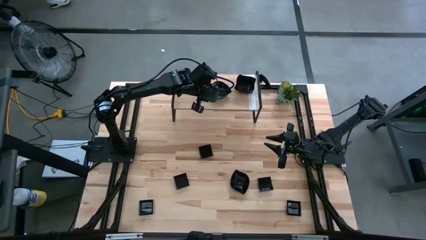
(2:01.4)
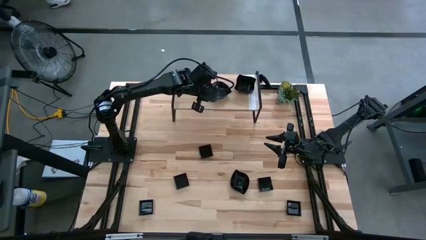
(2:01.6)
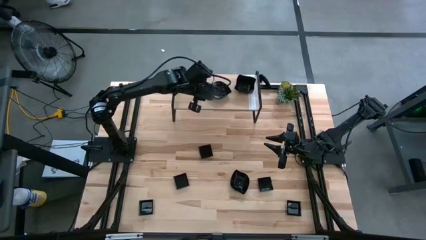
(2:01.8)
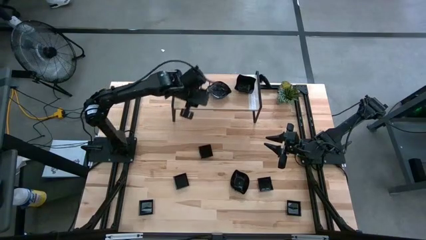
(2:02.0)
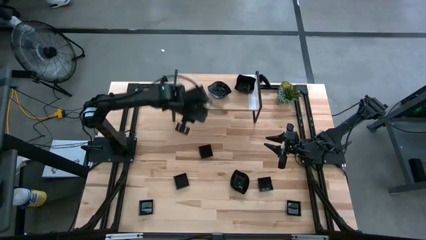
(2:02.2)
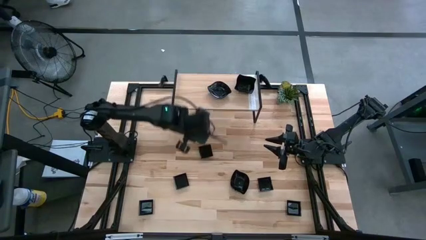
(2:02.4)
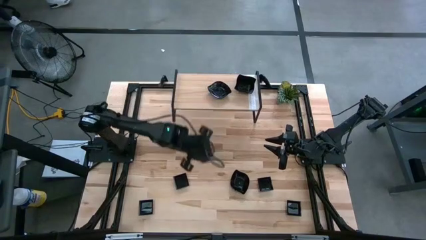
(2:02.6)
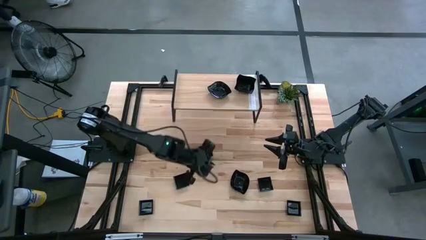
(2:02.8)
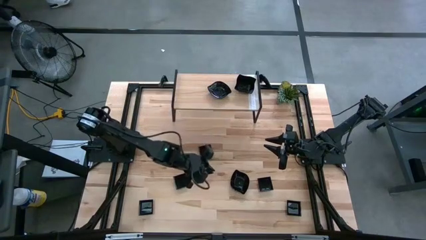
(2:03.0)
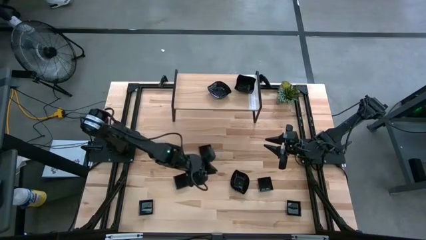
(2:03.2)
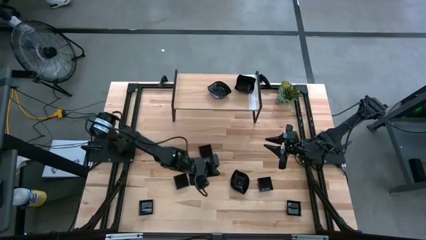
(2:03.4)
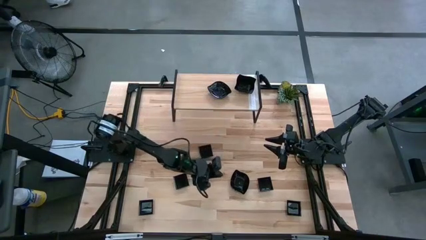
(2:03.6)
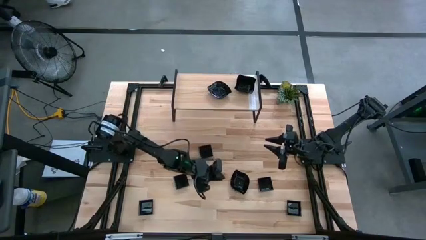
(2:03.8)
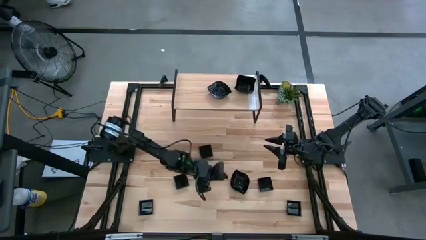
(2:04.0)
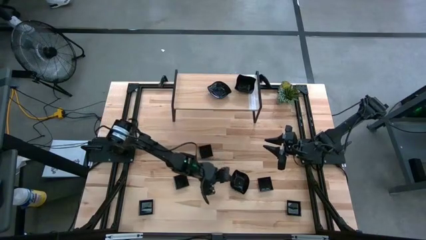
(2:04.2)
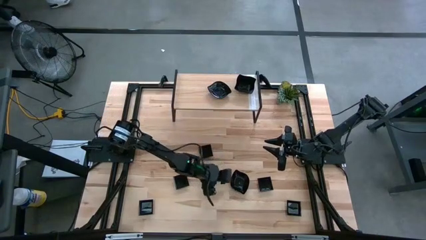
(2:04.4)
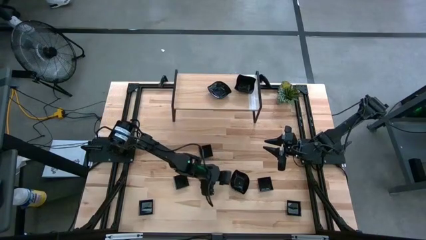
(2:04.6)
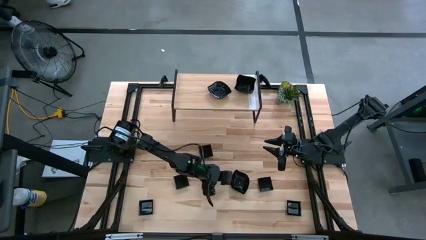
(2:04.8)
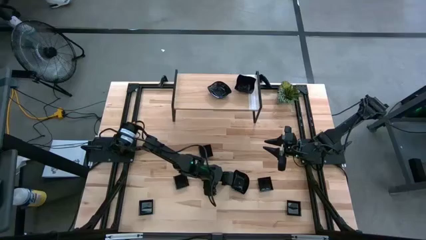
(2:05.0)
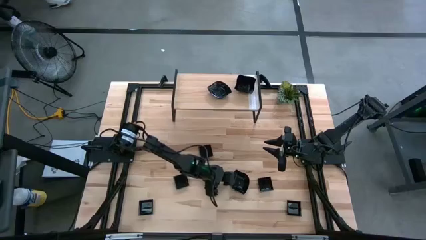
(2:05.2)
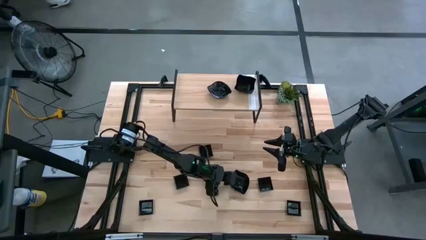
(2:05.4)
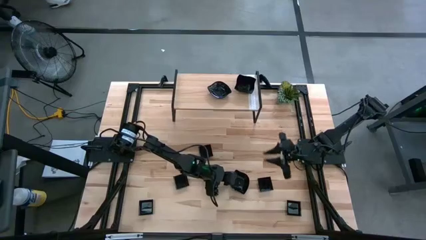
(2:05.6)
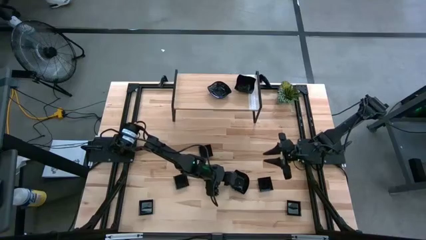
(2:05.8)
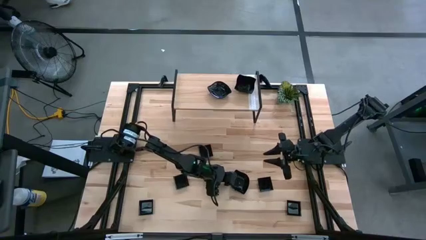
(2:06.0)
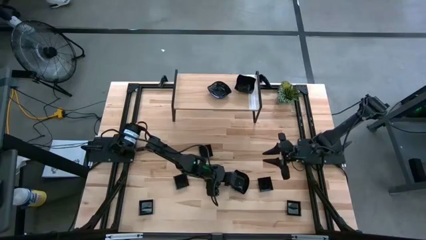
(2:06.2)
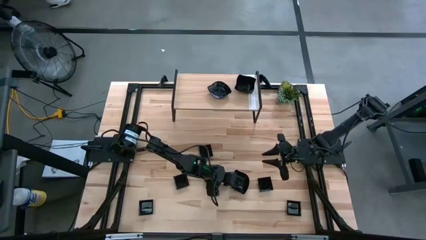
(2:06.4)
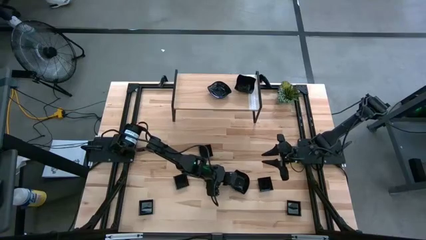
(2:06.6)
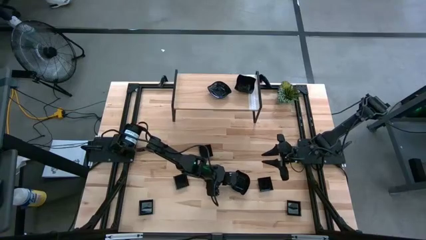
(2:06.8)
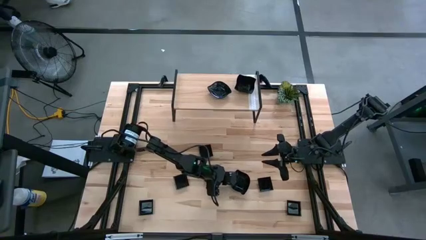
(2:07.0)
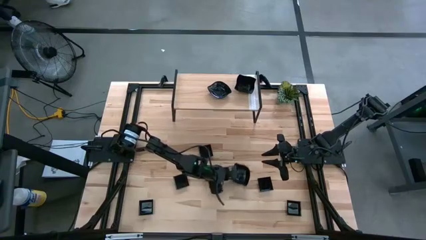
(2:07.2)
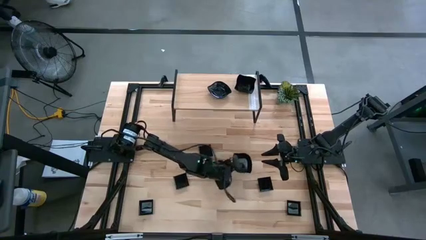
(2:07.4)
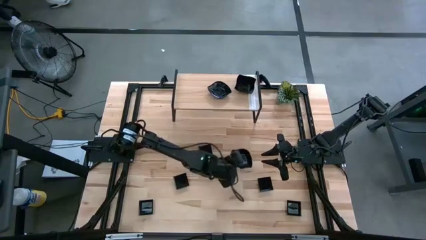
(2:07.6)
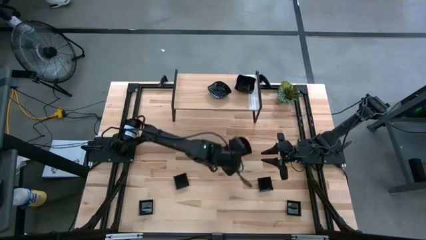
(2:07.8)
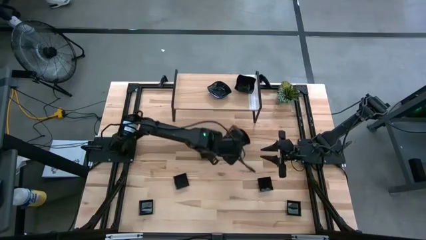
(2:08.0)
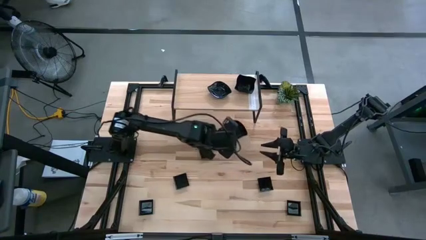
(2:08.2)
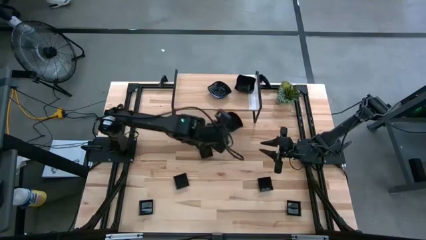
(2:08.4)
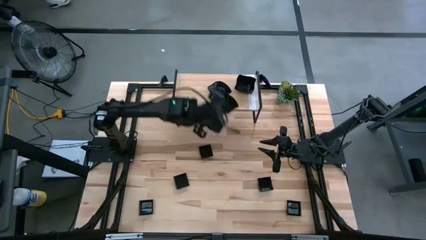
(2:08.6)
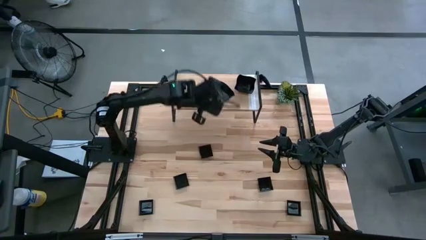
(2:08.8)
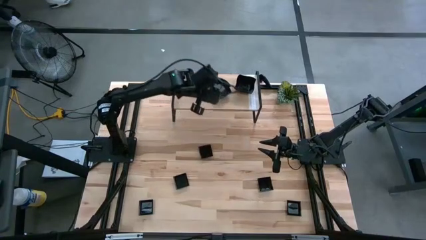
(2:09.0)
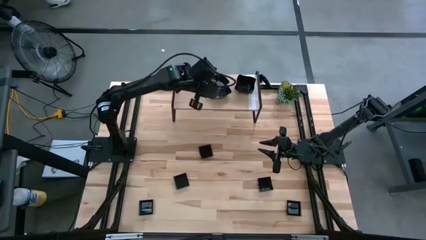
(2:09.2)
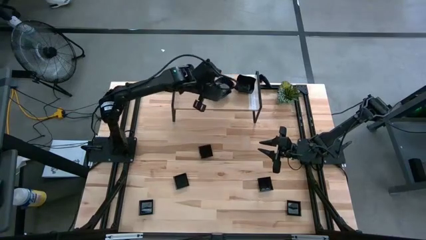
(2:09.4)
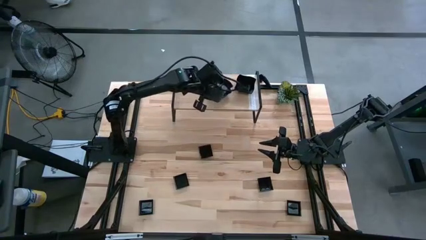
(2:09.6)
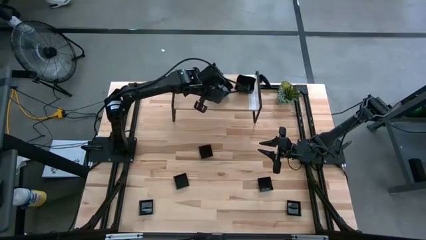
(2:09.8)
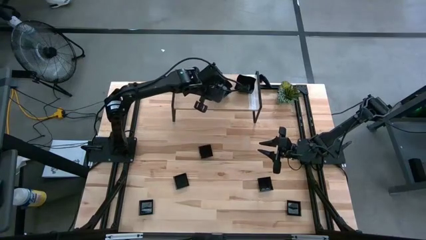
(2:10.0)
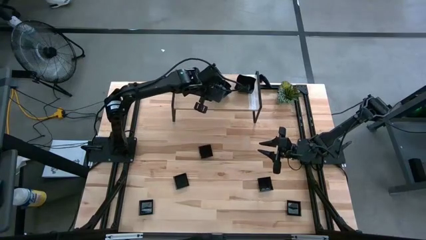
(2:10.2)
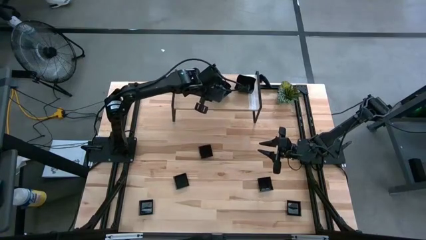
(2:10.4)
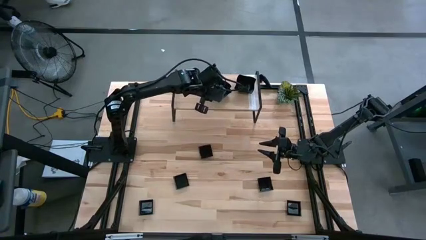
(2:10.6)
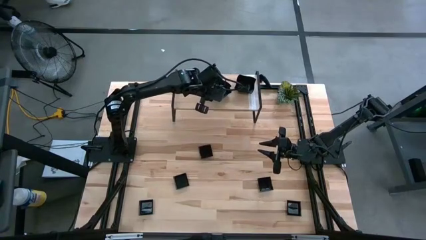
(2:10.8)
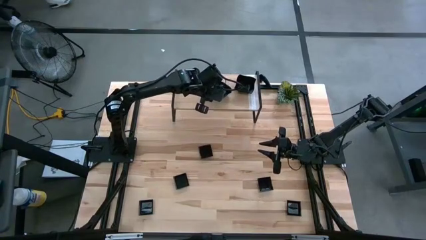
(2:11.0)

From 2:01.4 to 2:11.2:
Task: Pick & Place Mini shaped plates
Stack the leaf-shaped plate on top of the other leaf-shaped plates on the shelf

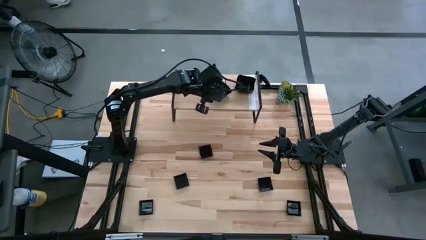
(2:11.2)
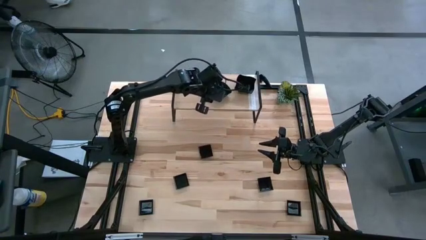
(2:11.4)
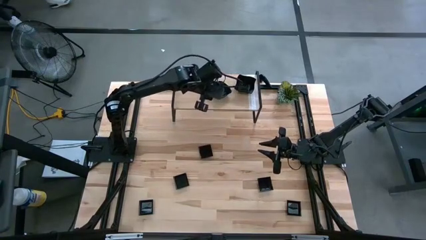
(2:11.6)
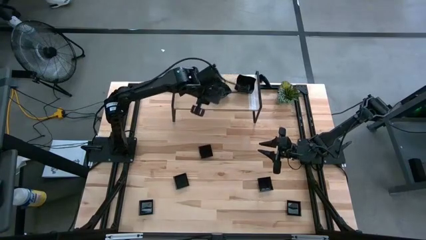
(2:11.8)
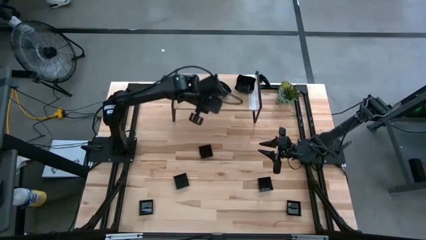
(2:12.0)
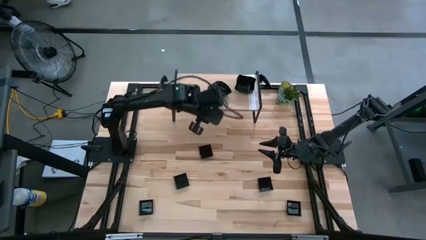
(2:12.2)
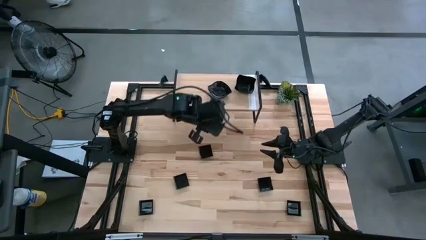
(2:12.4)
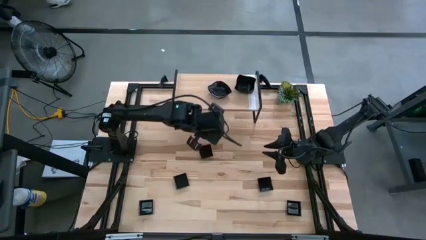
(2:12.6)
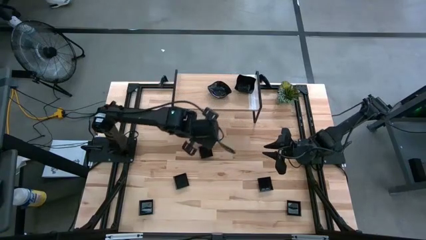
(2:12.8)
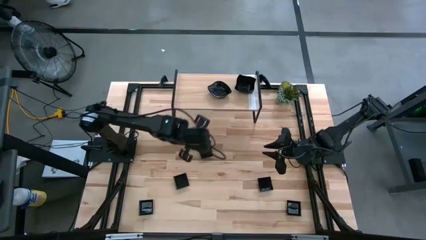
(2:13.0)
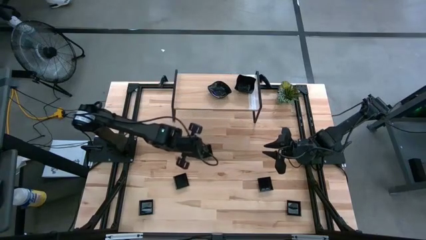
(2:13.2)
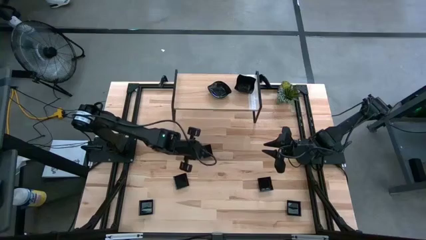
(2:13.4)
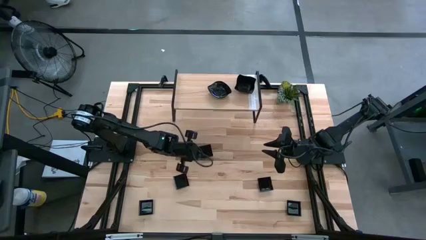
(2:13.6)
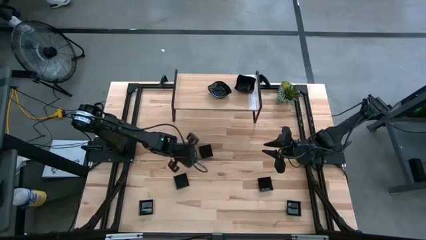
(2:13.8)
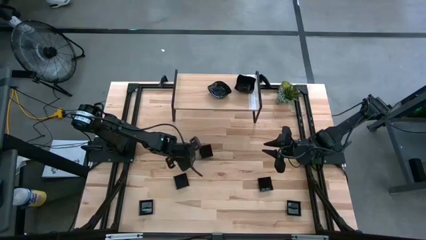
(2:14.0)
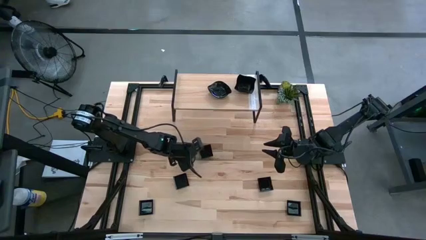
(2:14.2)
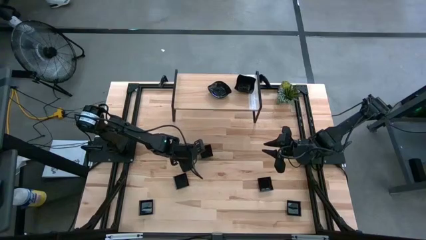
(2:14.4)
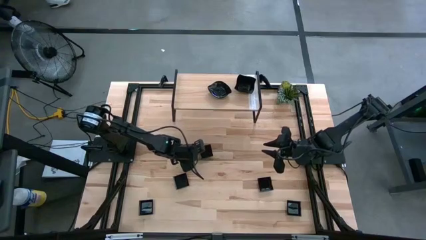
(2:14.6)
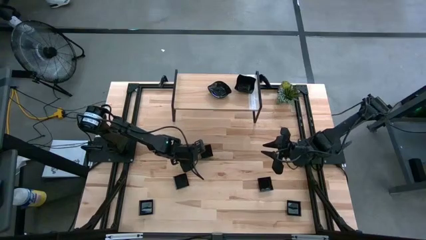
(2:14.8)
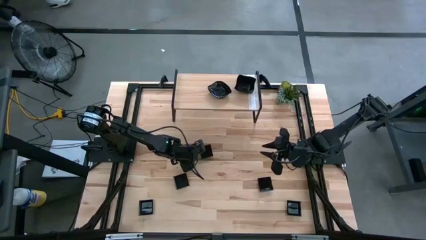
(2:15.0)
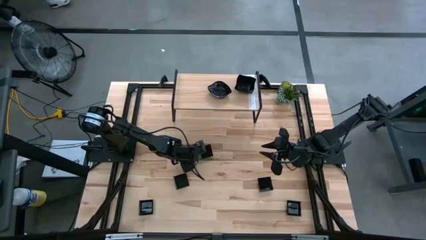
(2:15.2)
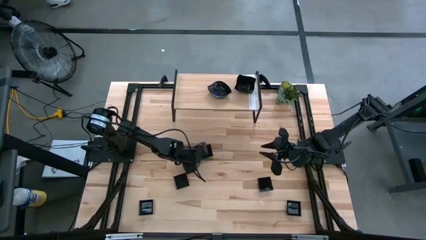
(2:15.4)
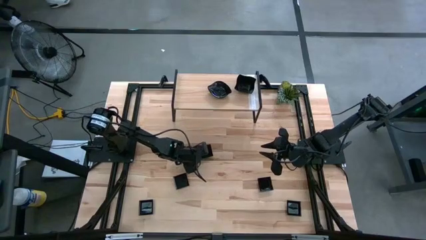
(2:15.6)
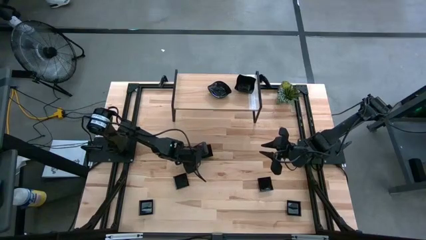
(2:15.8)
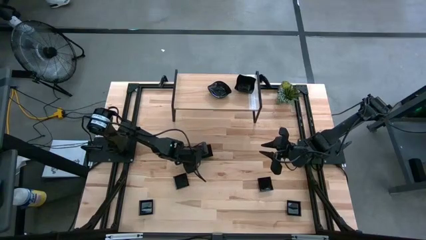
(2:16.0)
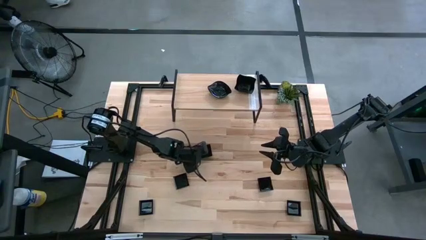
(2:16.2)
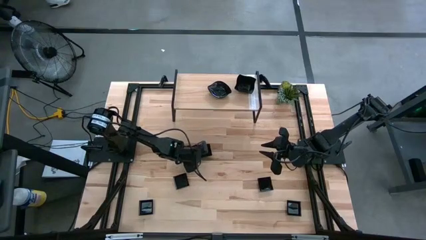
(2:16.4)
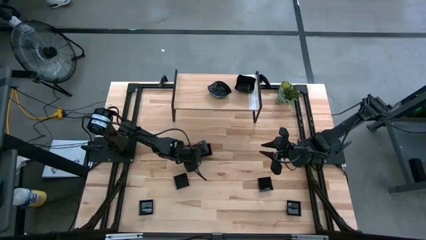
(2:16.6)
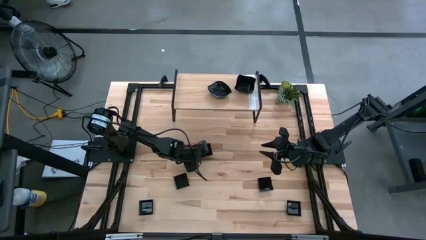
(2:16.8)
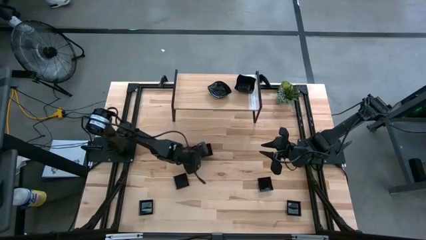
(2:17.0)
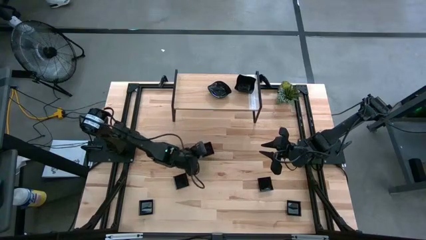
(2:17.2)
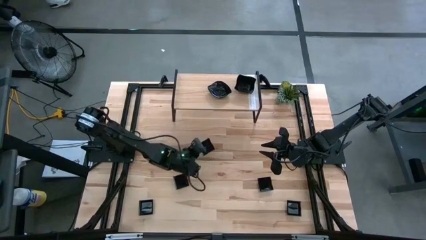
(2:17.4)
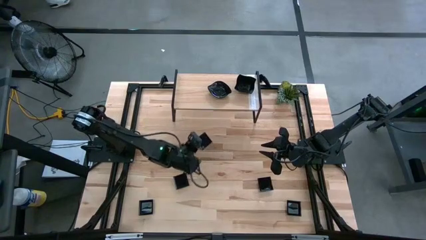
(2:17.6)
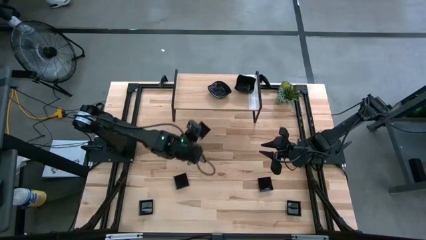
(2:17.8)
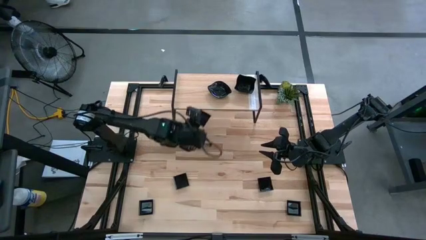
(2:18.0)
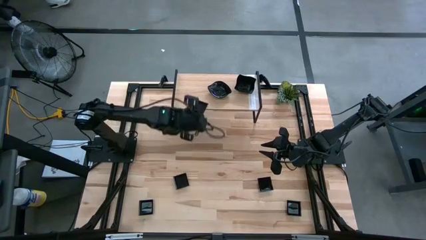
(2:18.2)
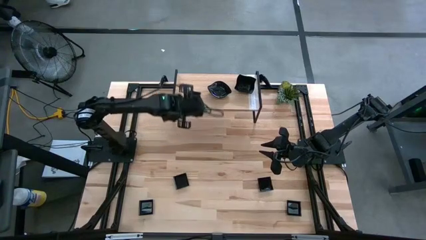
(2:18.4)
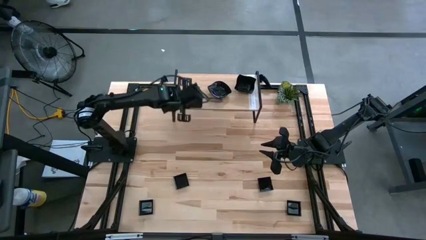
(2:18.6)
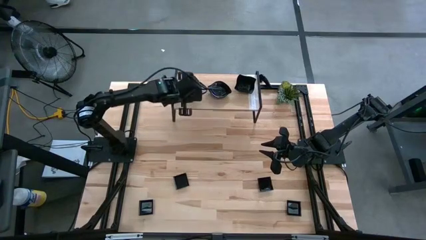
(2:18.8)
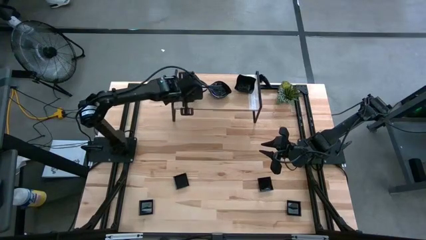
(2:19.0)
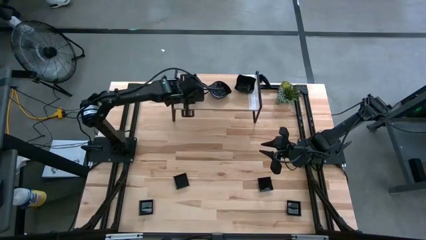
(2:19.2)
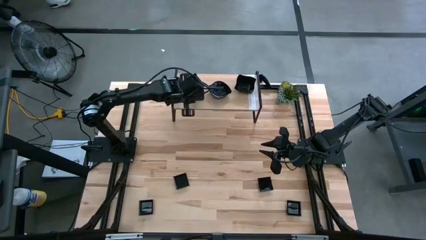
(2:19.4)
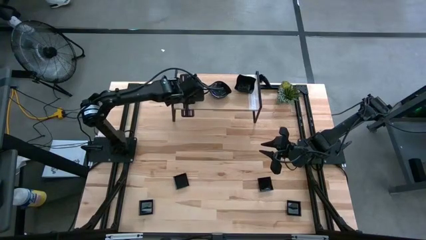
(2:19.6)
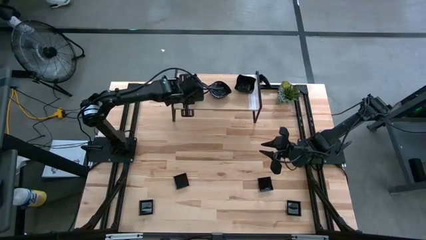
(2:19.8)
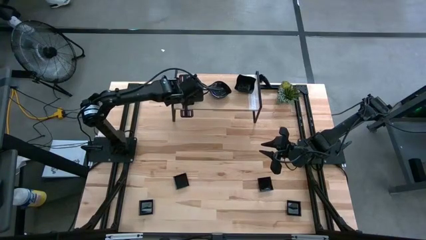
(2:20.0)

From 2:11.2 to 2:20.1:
Put the square plate on the shelf
